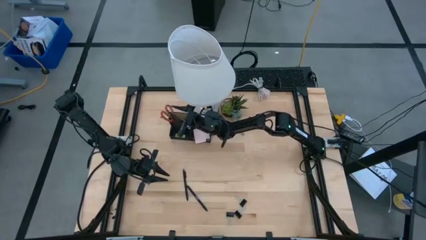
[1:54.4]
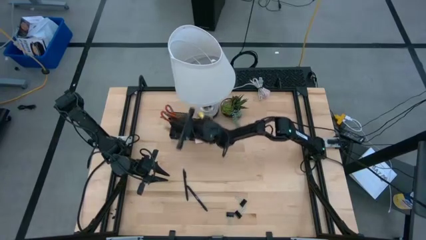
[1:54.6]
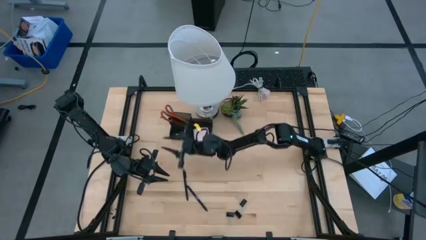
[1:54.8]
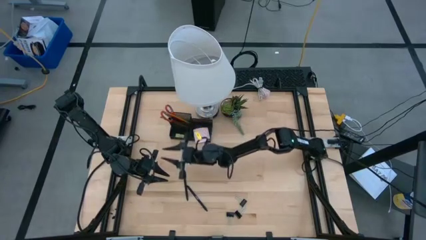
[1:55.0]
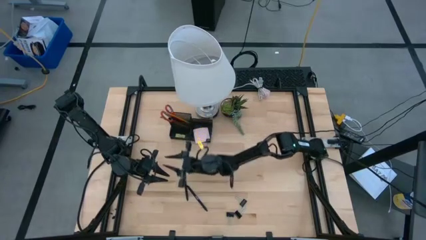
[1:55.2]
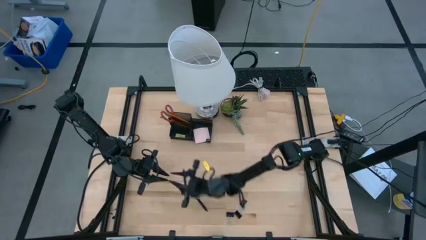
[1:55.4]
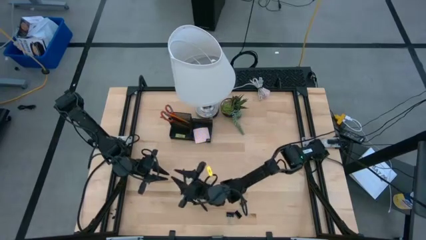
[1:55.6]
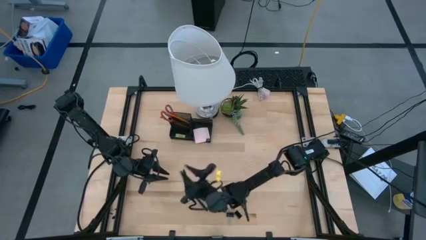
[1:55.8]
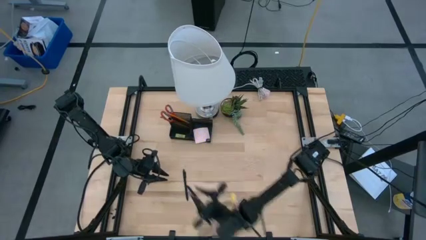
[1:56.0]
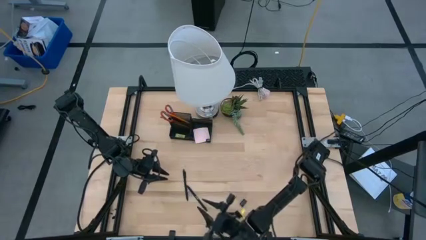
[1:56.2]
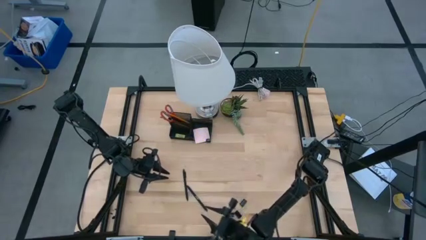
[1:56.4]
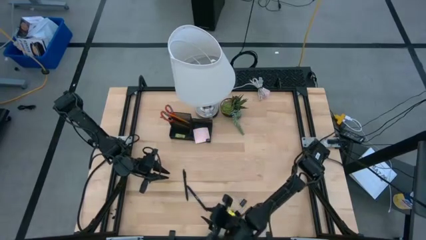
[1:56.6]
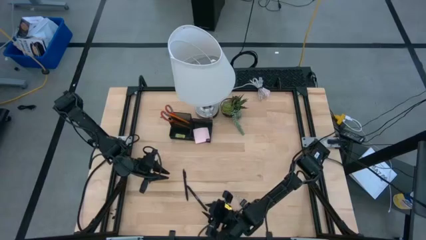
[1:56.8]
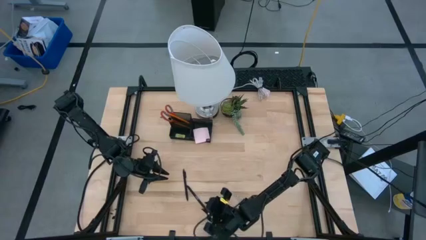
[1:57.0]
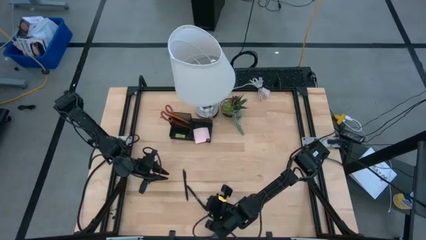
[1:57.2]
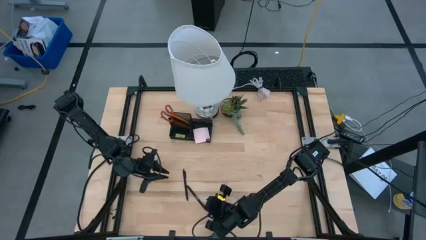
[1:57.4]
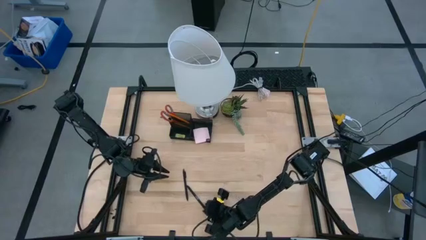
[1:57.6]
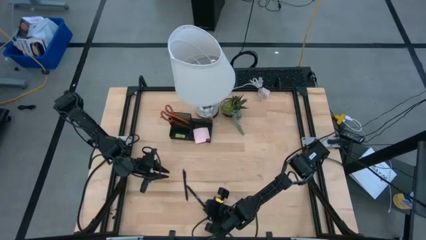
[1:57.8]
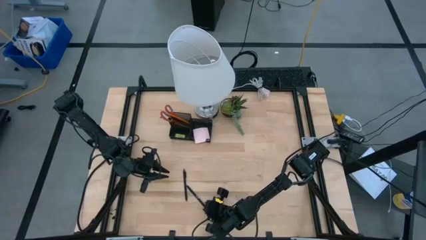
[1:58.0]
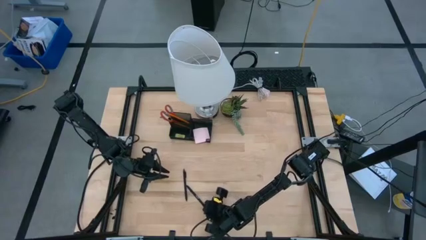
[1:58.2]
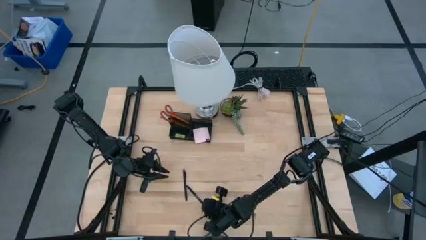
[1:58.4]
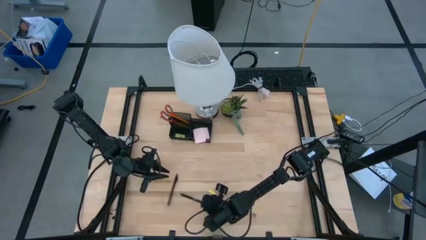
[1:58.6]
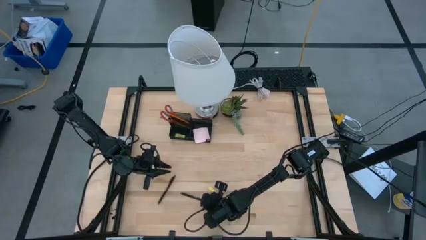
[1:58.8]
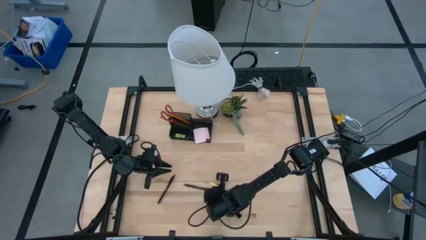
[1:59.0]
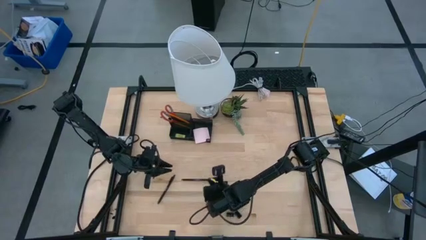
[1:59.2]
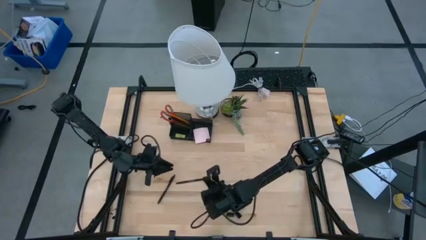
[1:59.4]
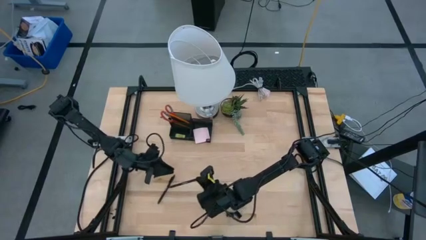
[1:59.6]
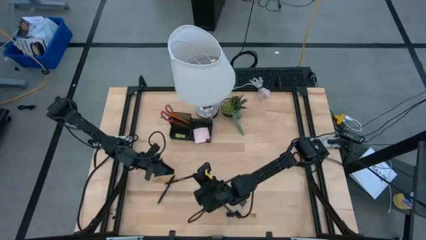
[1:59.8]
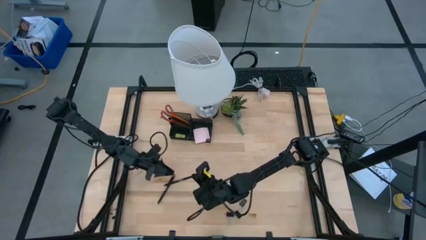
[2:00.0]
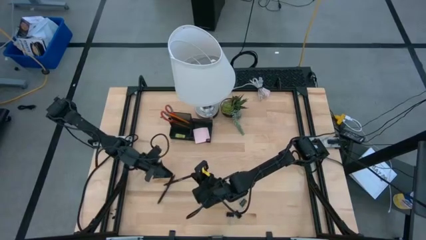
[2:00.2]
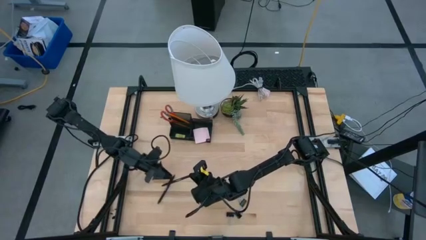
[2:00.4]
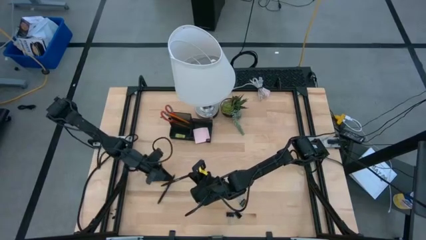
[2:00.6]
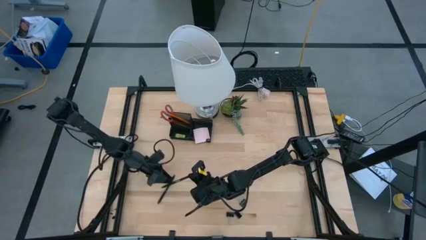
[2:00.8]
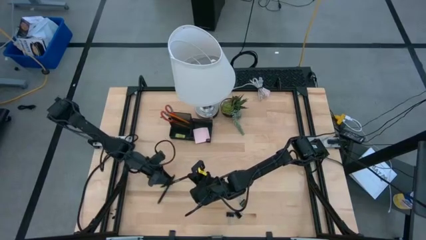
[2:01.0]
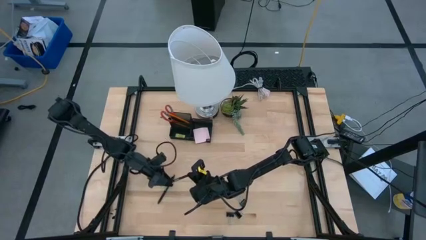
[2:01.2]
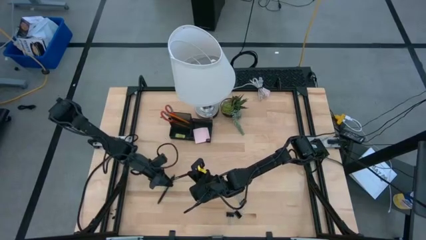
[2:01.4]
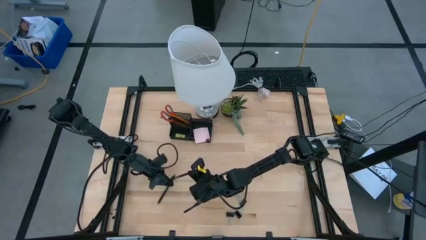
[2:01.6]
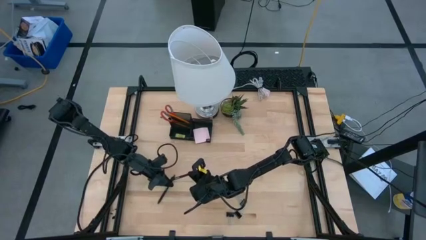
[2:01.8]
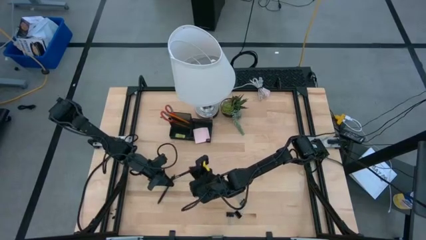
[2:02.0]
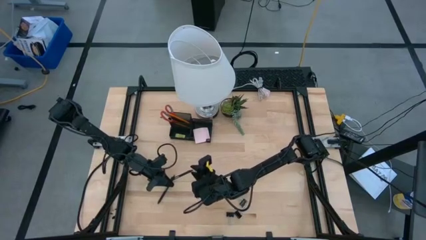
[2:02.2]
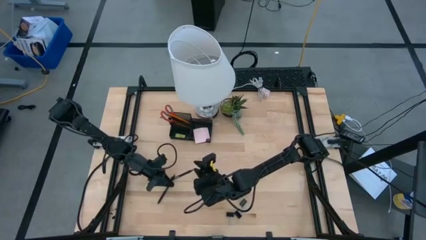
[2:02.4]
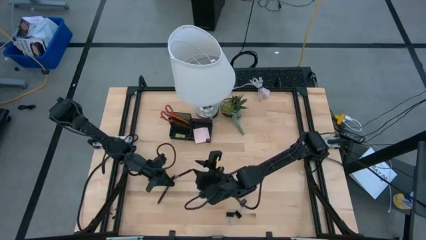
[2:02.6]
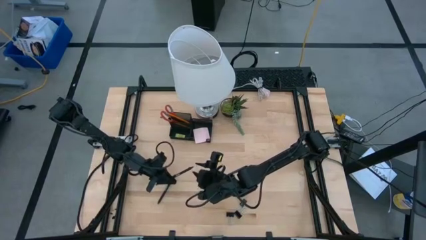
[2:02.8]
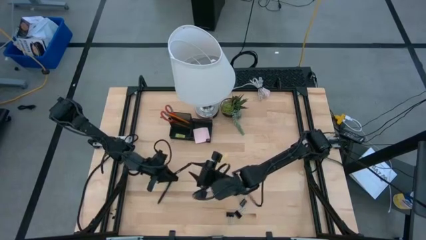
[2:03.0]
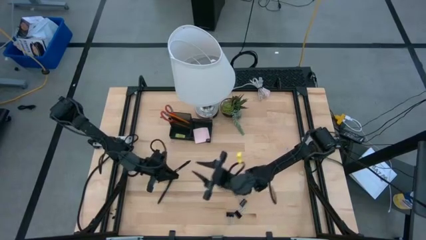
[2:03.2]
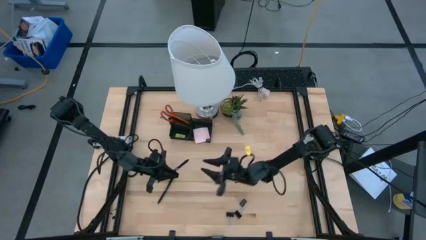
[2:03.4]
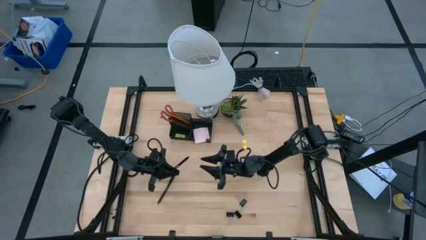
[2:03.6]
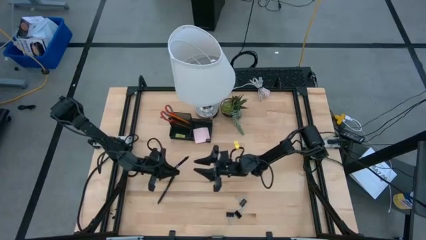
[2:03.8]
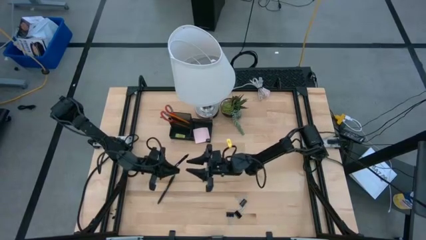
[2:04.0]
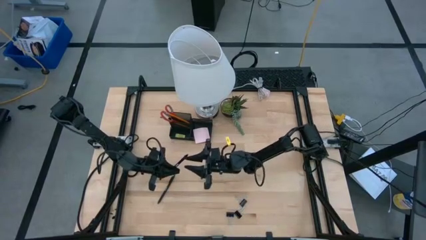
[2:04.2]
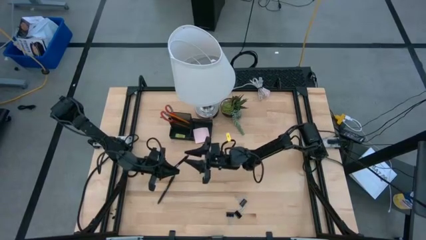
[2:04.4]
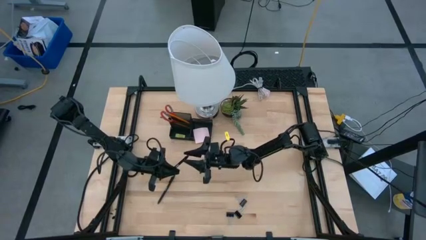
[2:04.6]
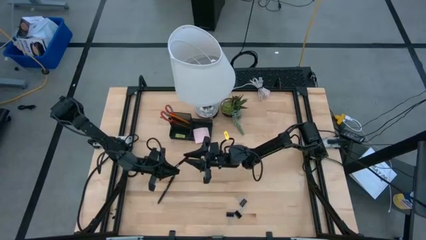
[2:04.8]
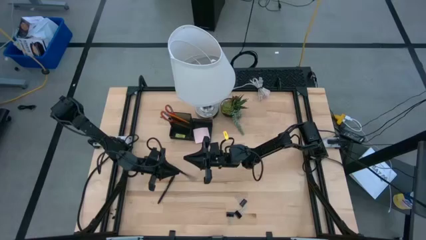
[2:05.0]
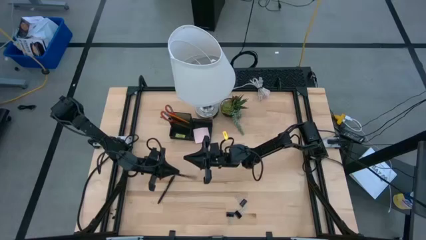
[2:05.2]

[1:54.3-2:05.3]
Task: Pick and place office supplies into organizer
Put the black pen into the black desk organizer

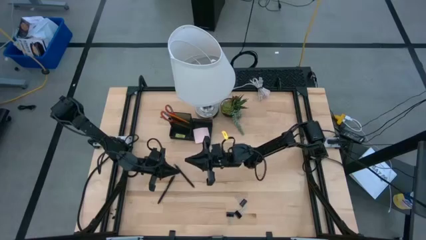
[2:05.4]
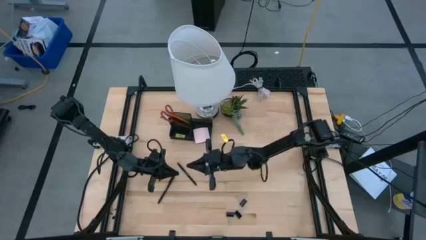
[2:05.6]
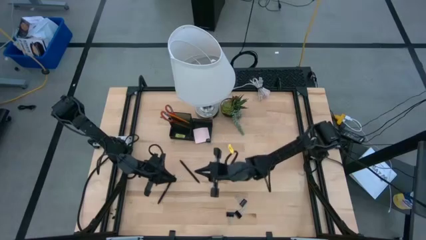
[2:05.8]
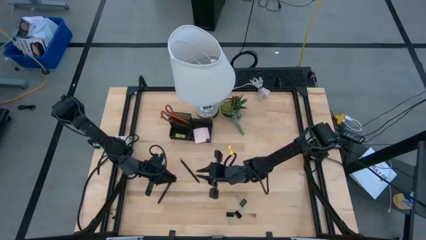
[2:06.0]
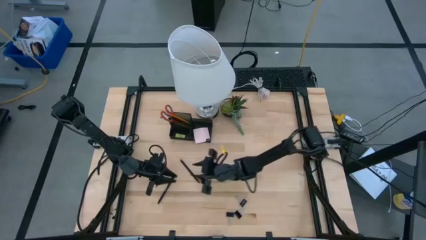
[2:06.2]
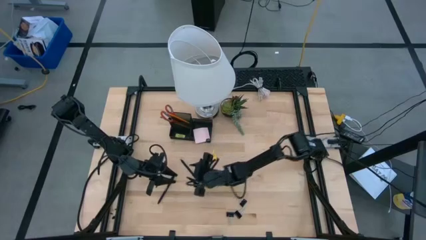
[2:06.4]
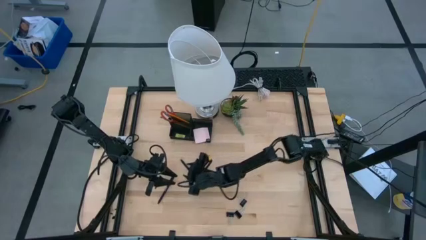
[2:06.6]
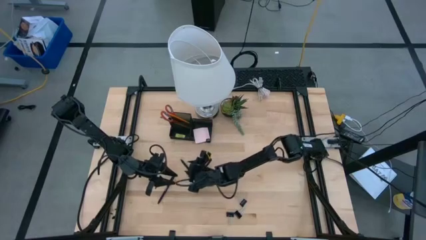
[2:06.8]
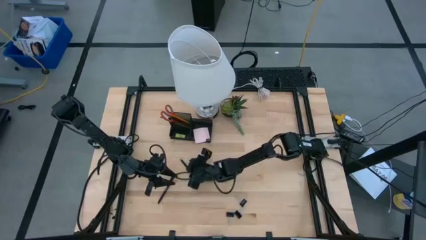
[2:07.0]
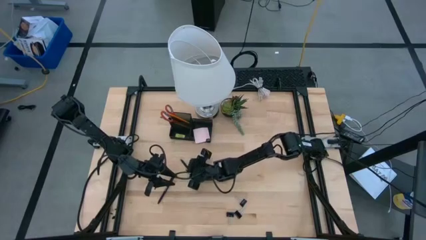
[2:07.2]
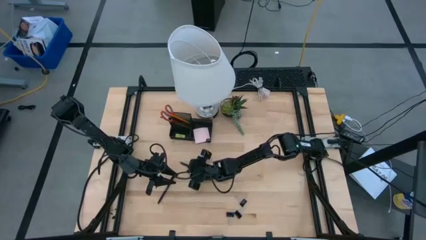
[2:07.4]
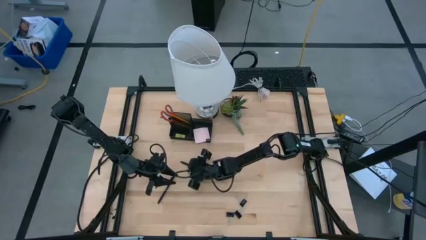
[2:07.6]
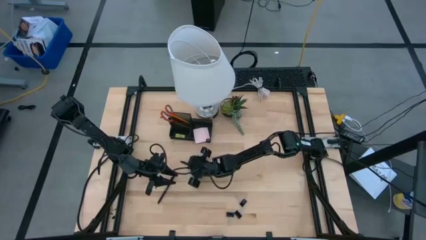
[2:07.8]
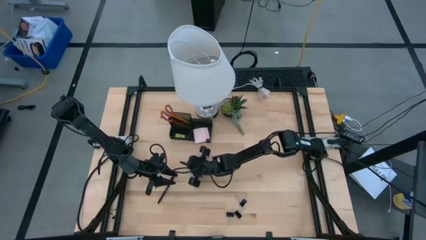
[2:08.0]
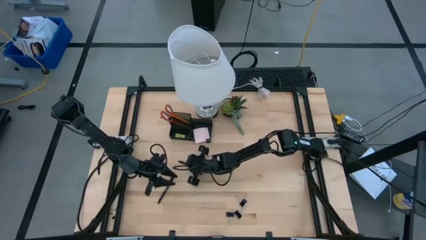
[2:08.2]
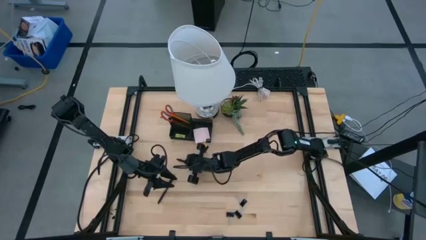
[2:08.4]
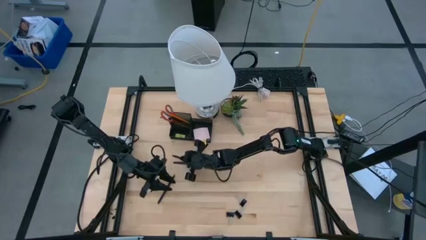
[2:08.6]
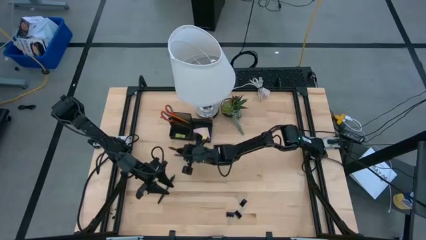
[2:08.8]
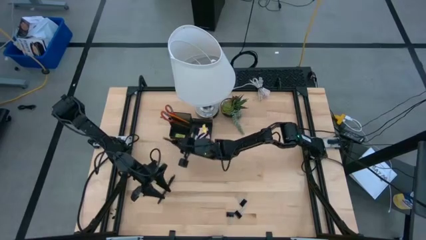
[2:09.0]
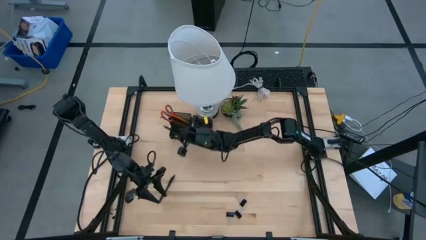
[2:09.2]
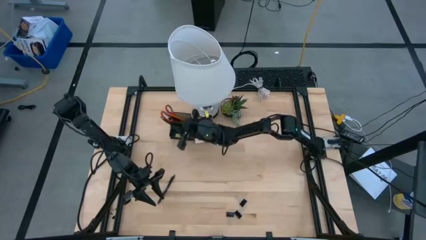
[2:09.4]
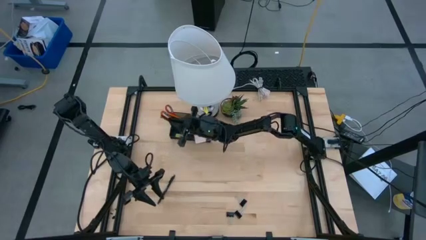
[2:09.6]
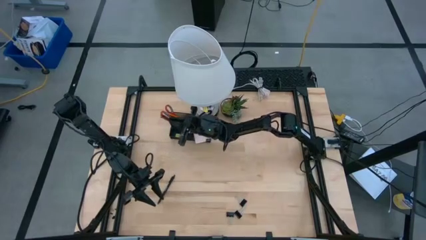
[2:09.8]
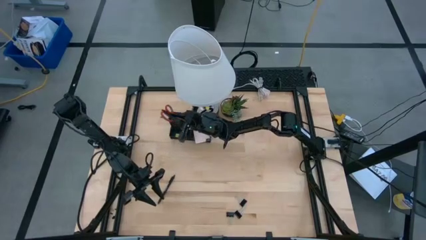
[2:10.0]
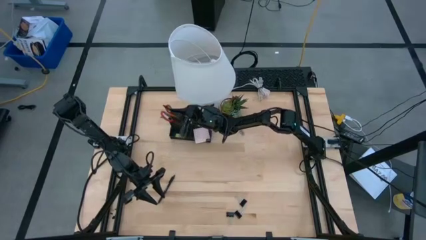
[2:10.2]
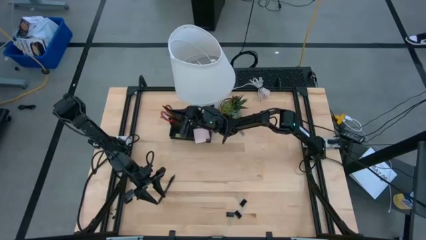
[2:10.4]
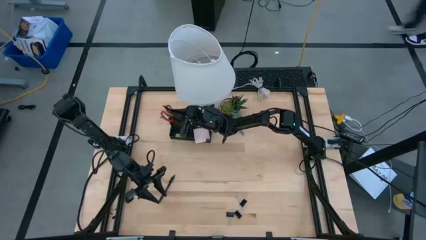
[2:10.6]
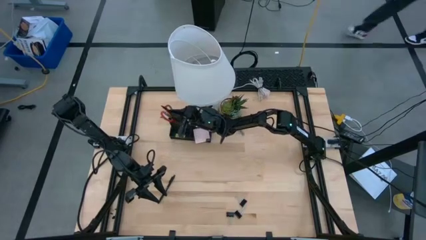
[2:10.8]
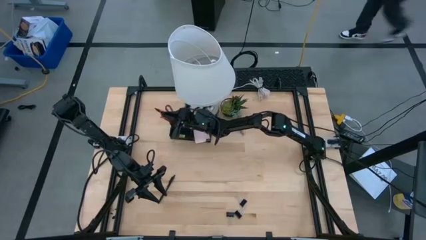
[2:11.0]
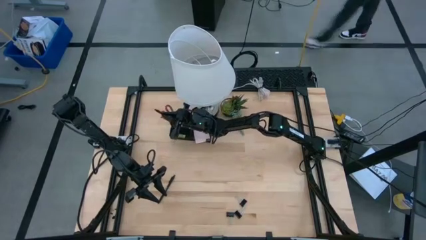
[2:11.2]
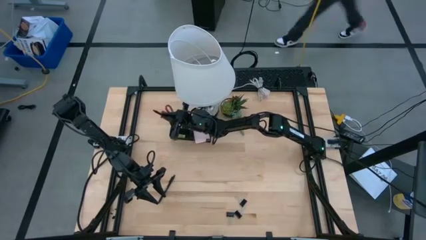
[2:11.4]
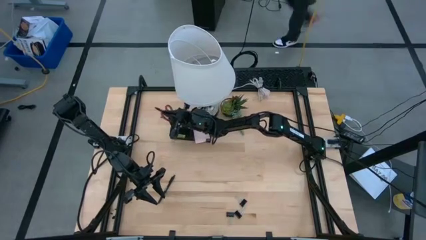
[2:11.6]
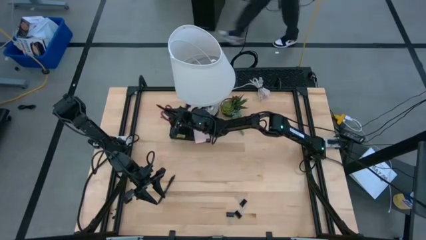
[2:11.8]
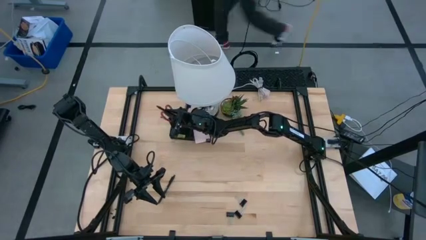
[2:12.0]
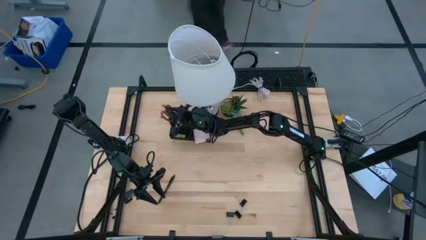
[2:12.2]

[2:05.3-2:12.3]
Put the black pen into the black desk organizer
